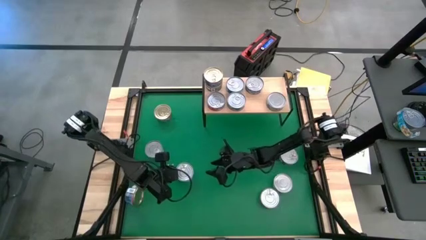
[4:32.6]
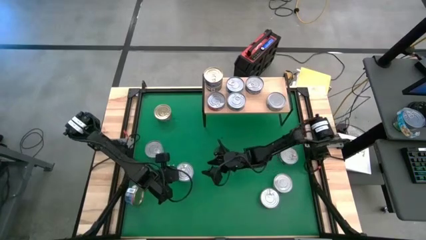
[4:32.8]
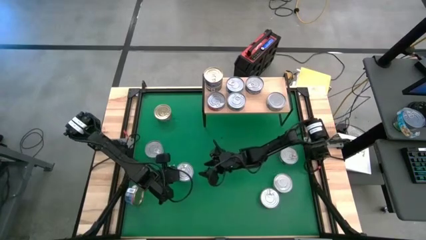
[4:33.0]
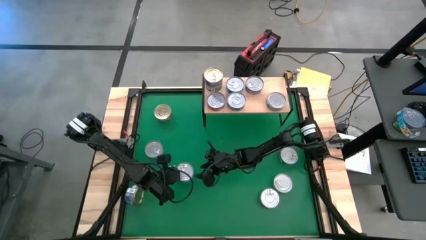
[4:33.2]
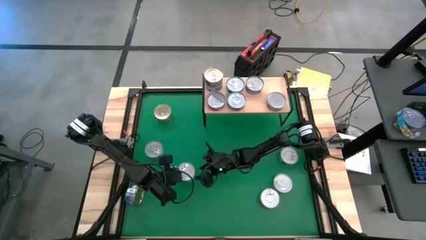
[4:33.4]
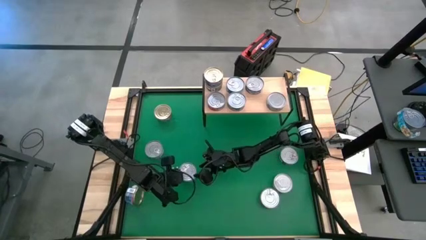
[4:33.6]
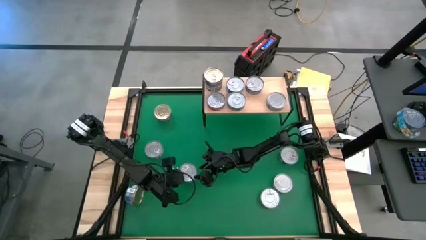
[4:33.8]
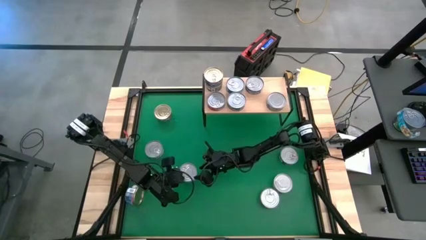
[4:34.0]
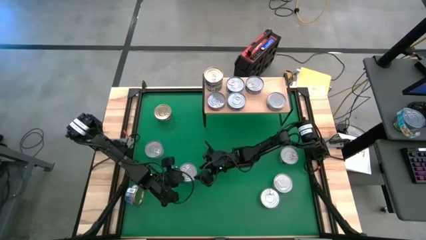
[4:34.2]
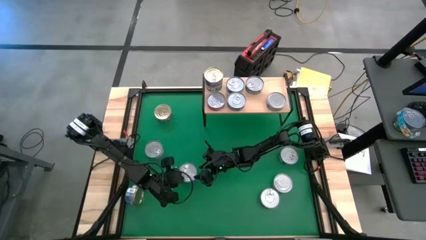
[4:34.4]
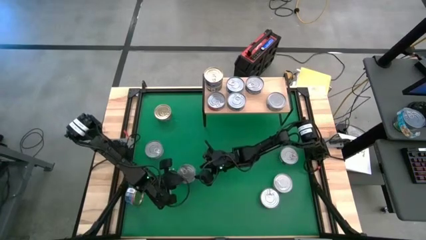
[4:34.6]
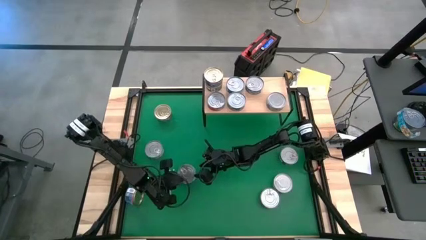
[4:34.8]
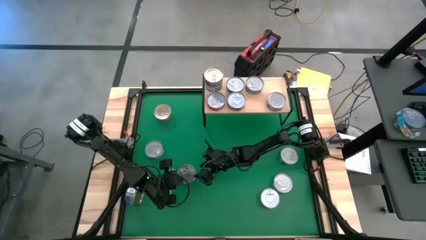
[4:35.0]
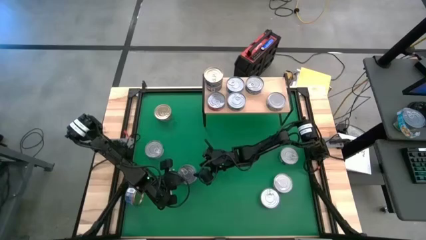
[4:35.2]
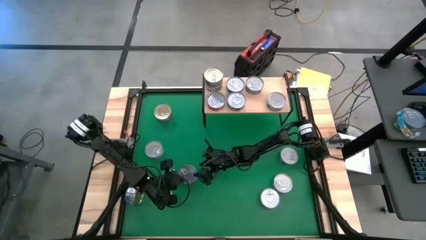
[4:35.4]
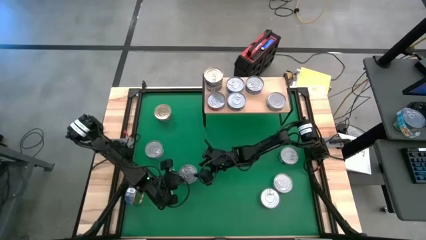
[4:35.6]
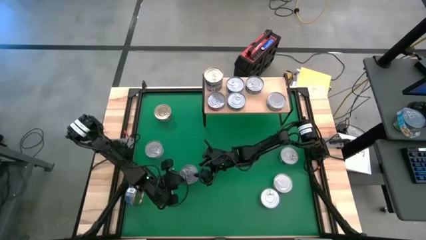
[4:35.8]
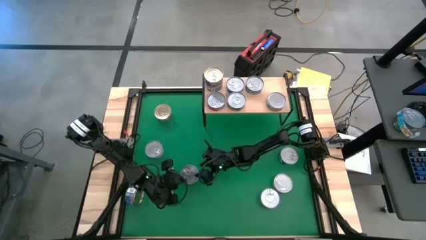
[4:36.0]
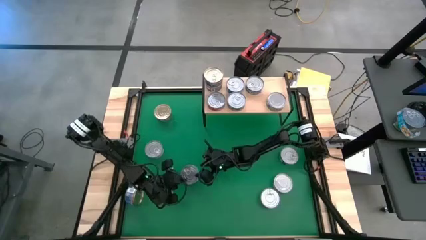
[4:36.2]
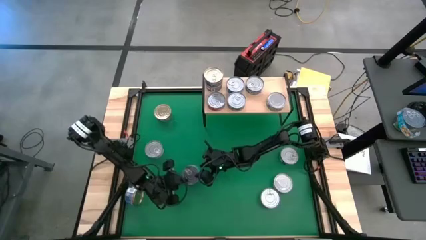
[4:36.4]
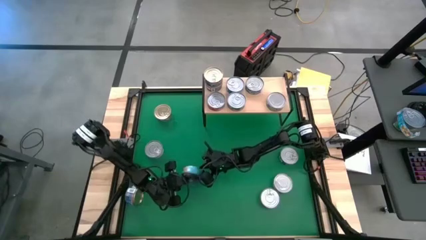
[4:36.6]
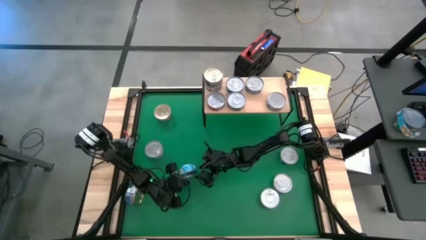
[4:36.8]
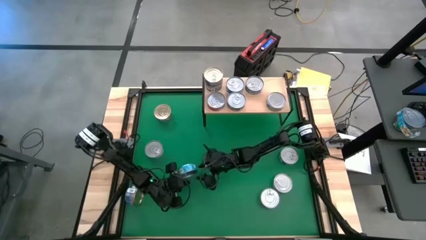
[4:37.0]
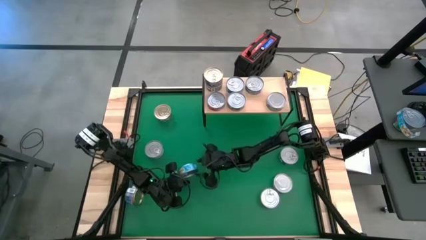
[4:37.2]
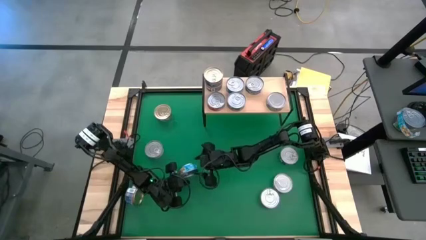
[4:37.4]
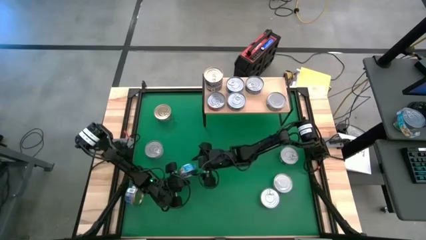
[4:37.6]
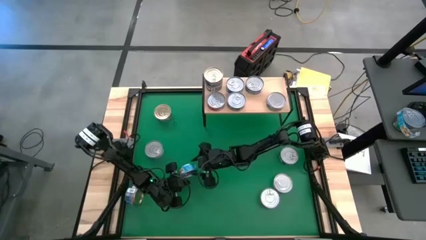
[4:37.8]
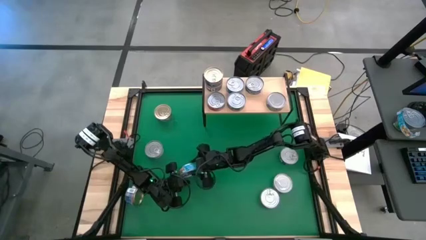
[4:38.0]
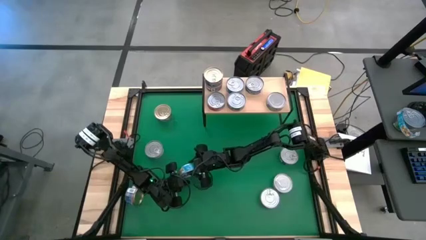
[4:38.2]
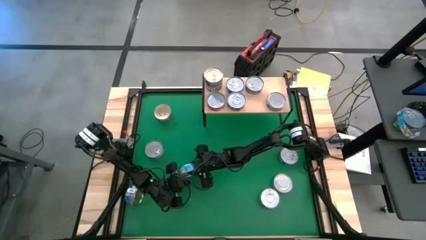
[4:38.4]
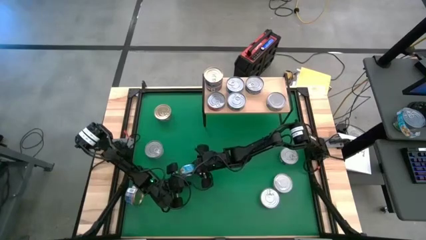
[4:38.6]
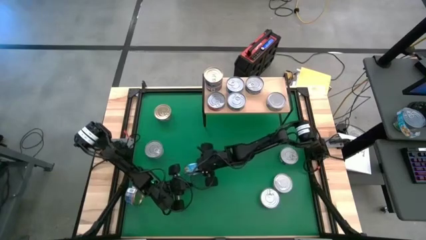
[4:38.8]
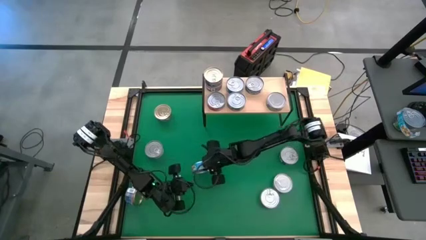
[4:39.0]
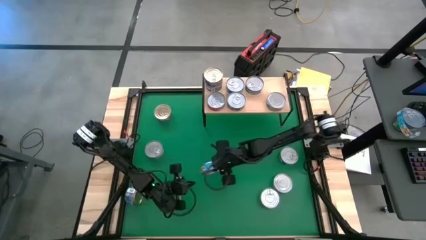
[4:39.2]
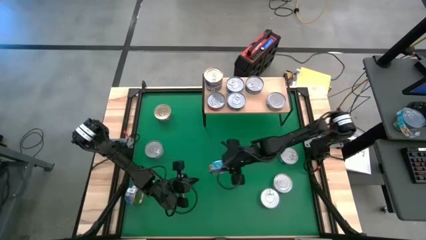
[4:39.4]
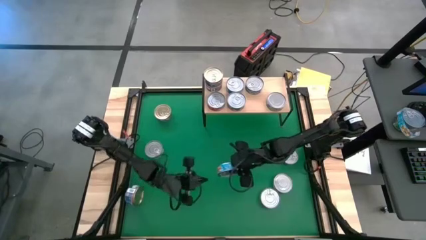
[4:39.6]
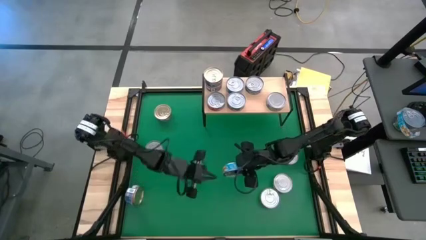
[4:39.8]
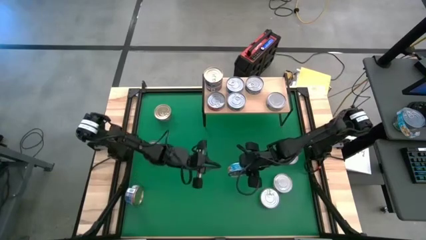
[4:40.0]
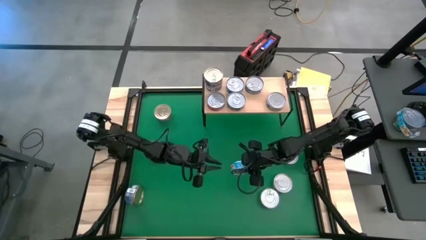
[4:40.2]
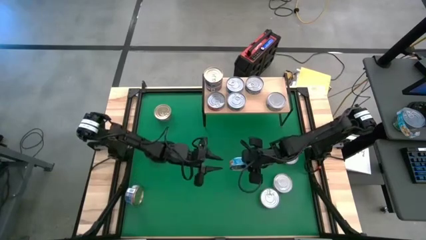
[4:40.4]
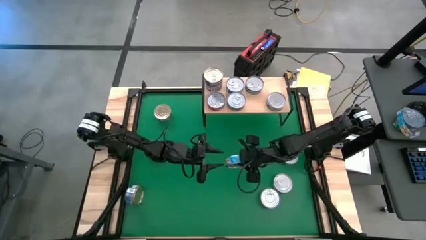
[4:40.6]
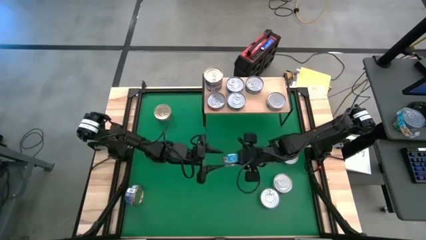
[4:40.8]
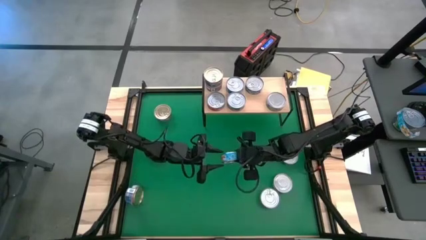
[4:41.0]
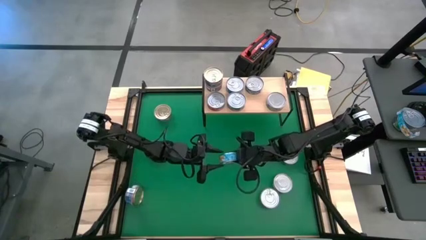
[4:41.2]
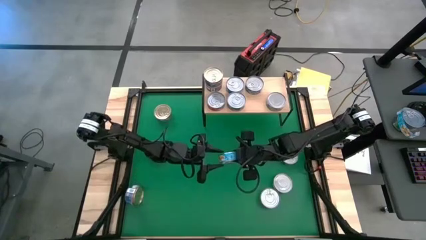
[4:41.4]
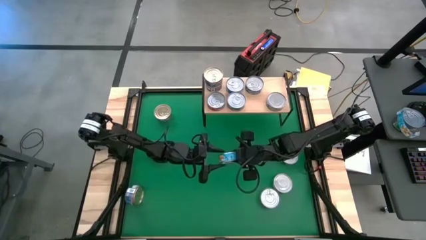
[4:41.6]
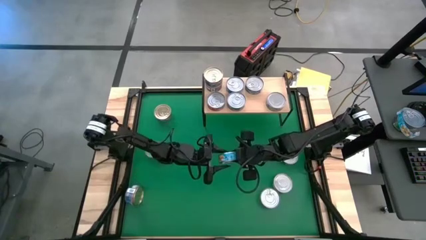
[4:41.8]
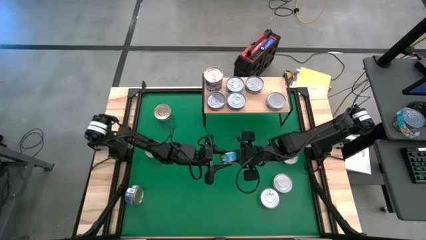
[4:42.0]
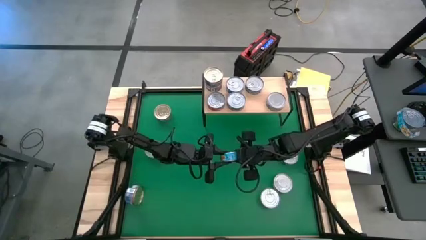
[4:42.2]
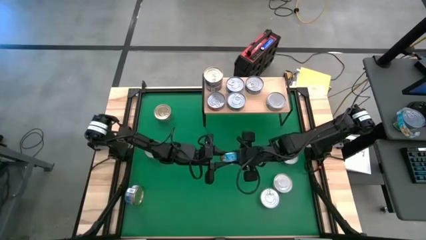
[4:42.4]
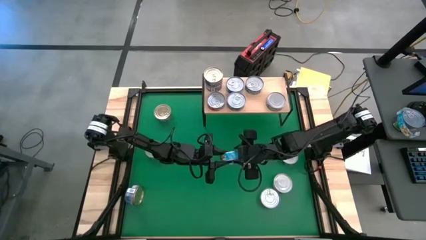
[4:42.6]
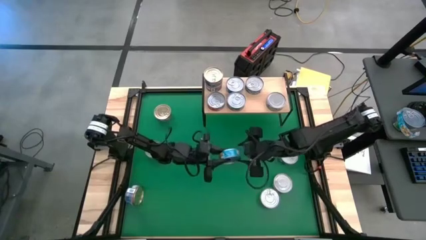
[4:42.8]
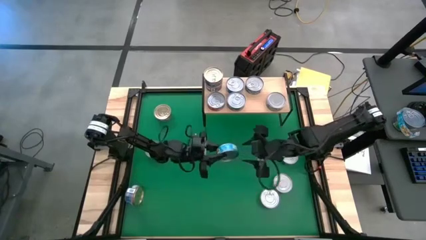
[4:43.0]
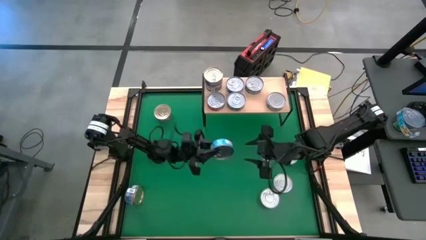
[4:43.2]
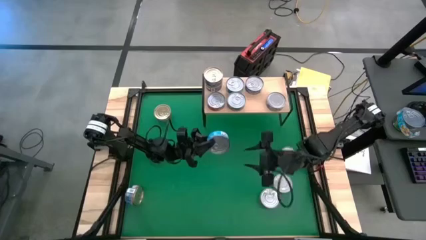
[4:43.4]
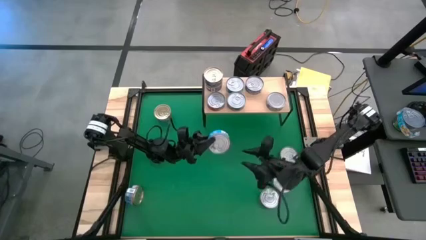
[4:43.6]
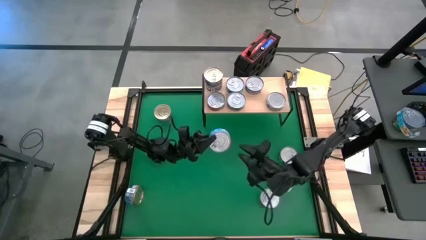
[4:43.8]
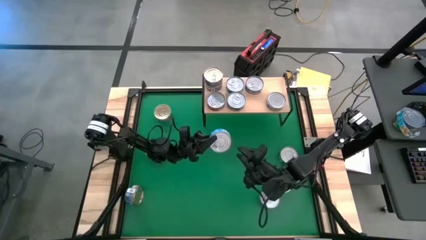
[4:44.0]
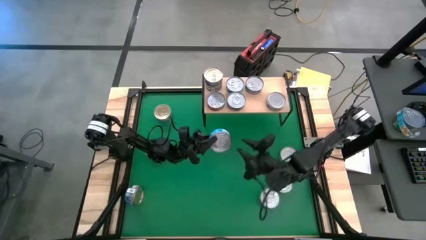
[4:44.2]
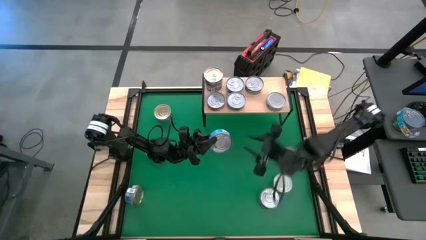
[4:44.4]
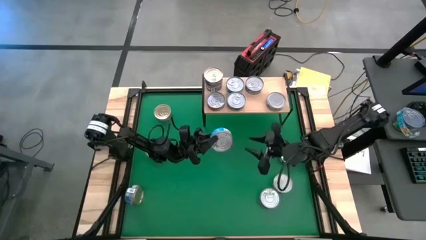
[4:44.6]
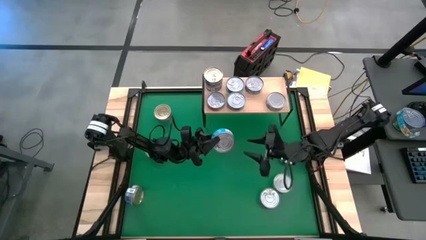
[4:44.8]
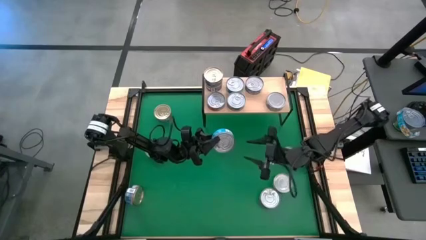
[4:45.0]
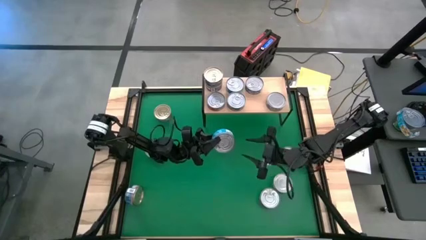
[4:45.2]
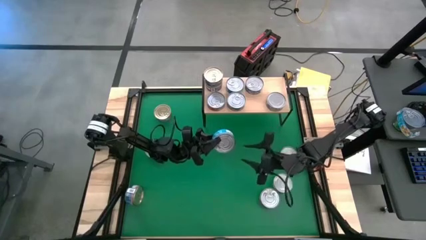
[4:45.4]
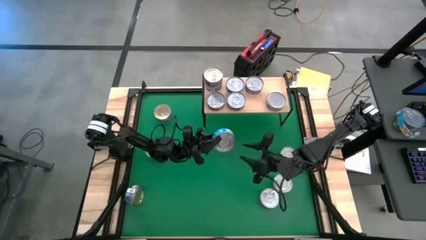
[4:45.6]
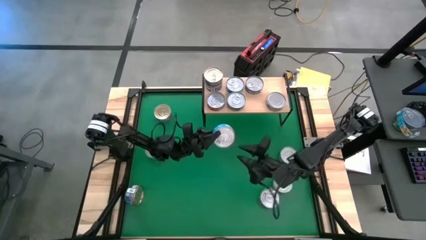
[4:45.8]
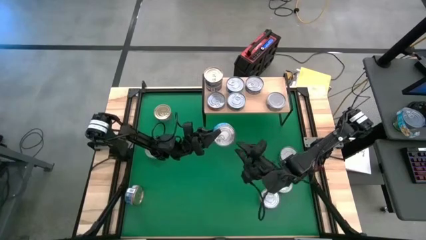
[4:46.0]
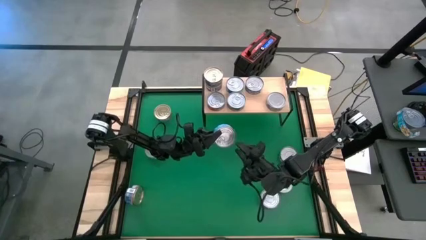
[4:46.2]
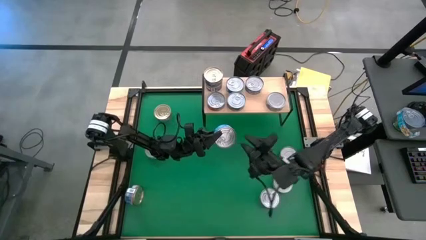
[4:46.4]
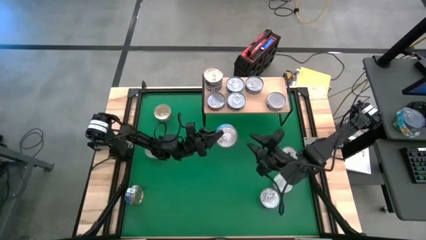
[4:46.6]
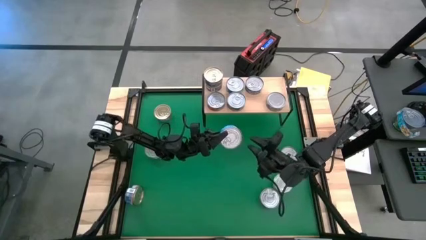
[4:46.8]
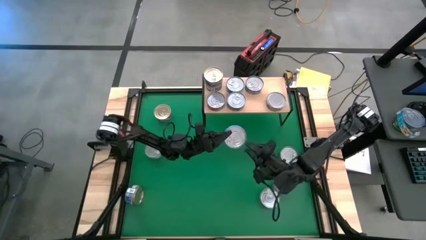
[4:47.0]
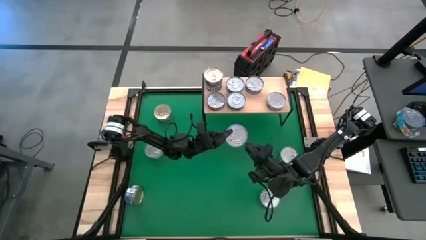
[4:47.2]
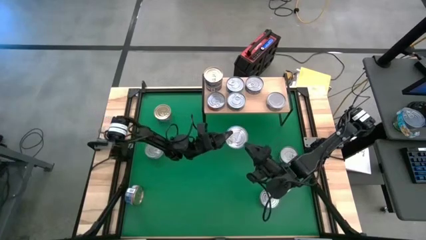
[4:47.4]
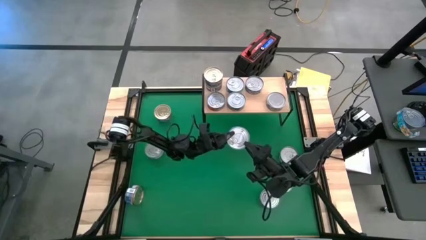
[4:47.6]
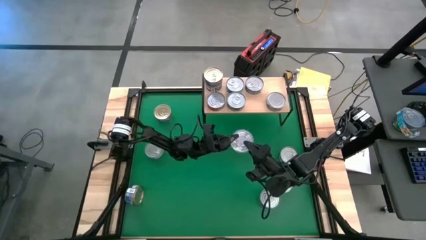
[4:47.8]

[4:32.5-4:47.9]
Task: Stack canned seafood by type on shelf
Put the yellow/blue tuna can on the shelf
